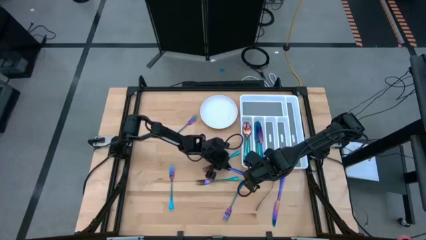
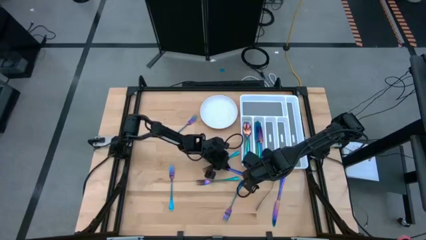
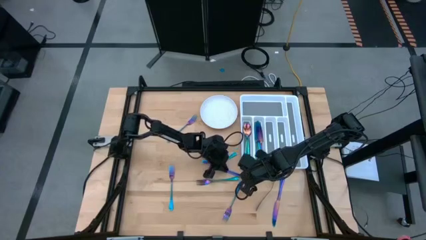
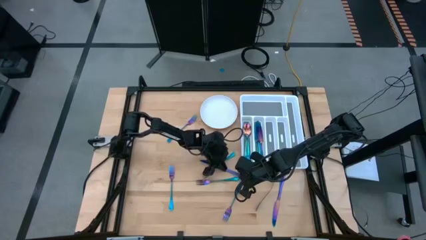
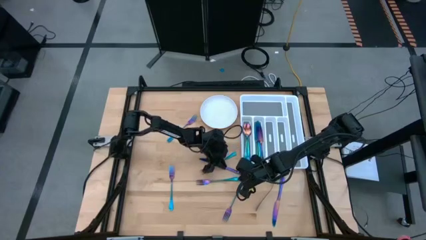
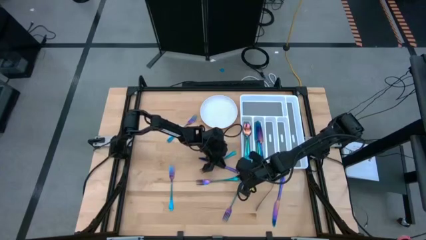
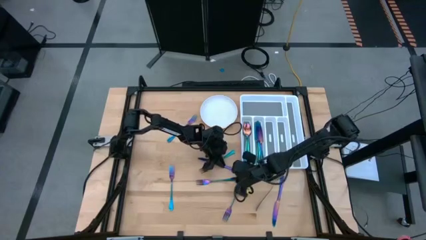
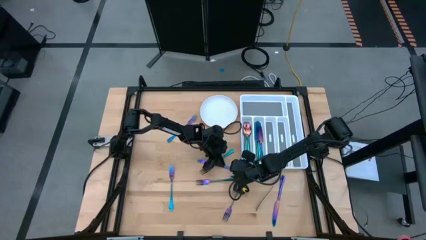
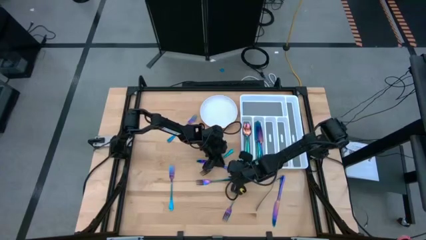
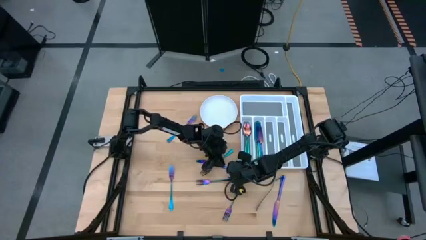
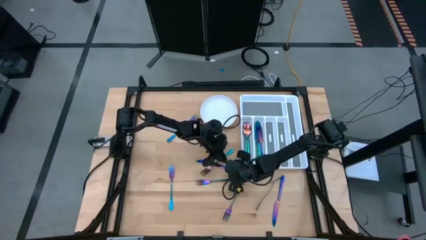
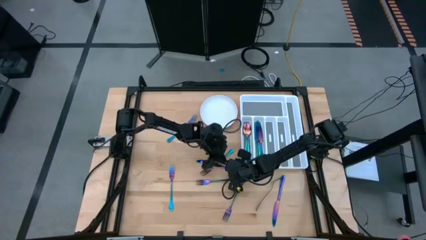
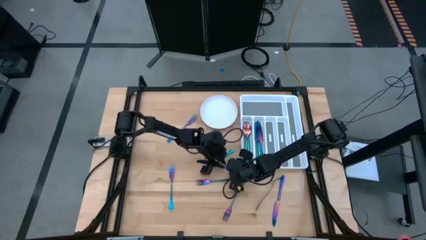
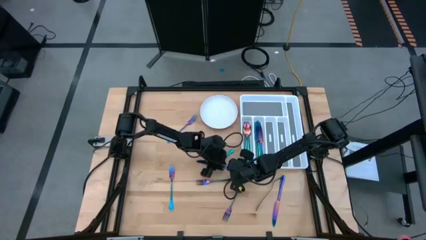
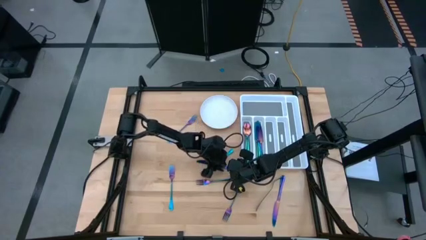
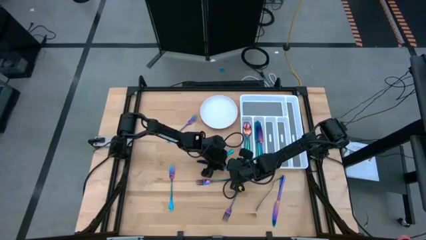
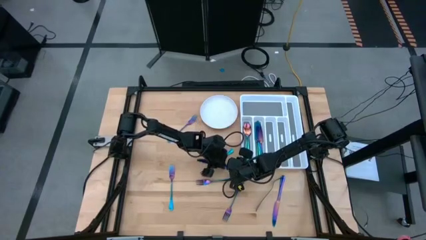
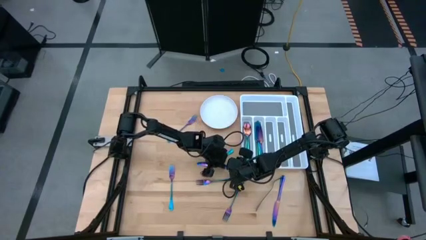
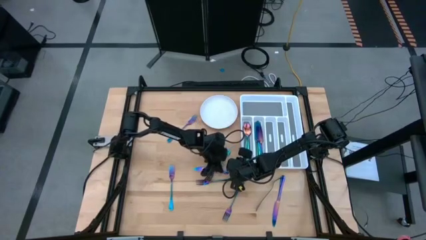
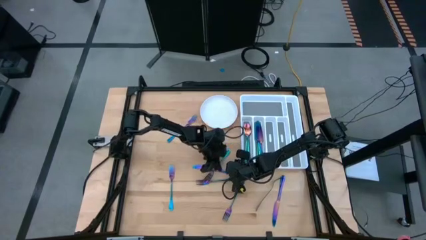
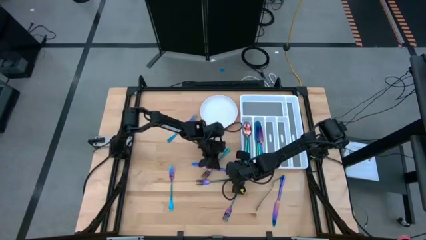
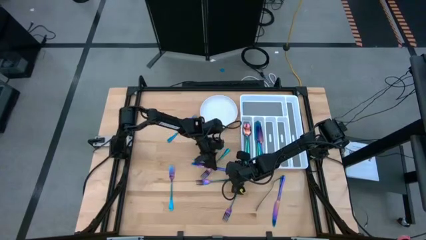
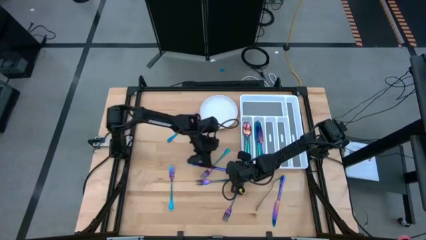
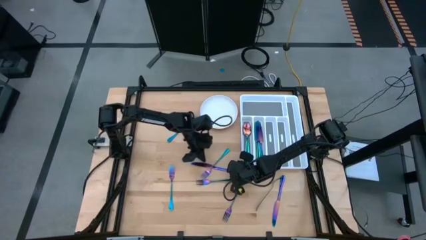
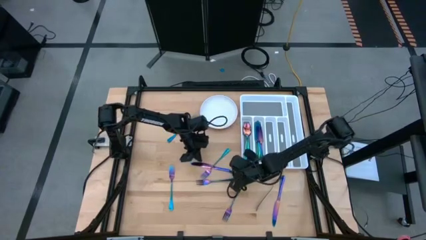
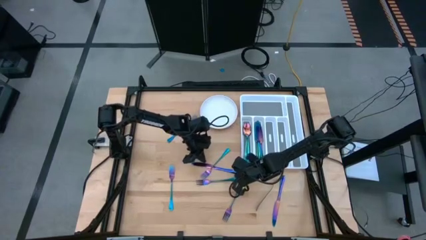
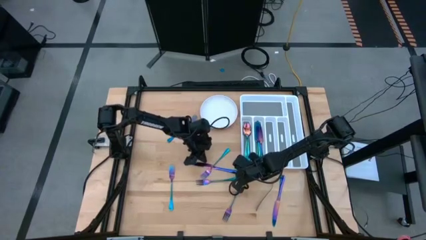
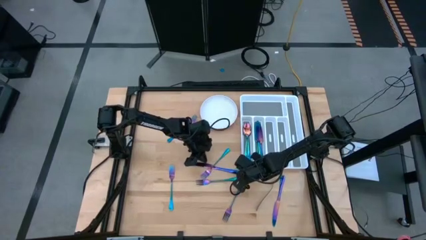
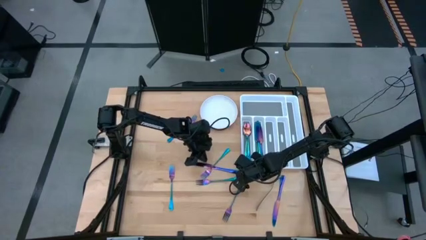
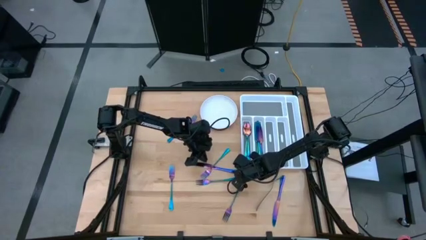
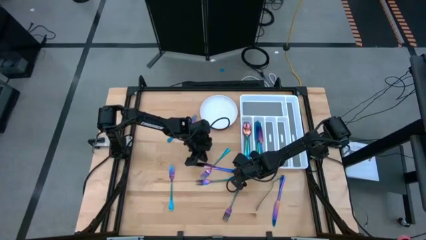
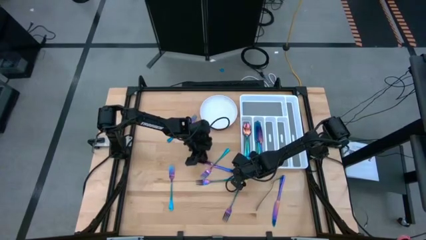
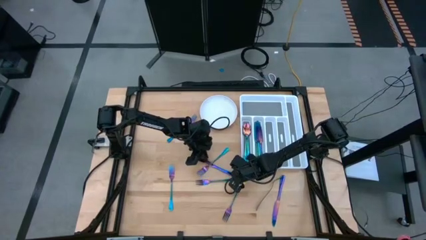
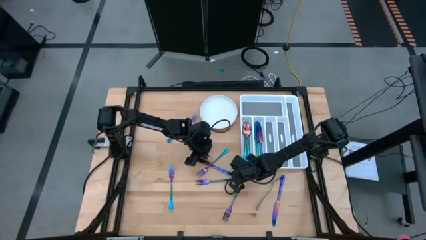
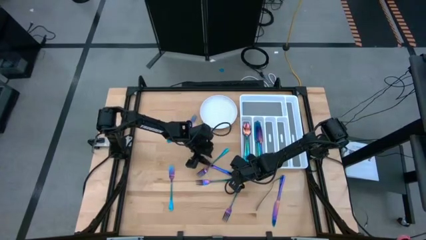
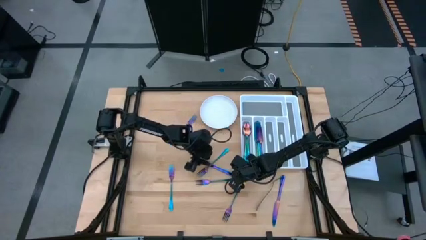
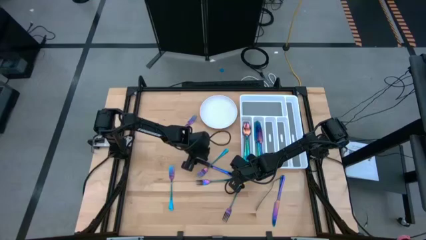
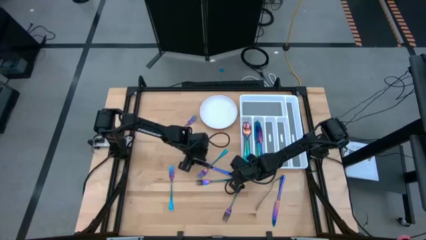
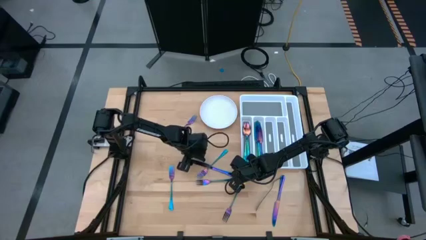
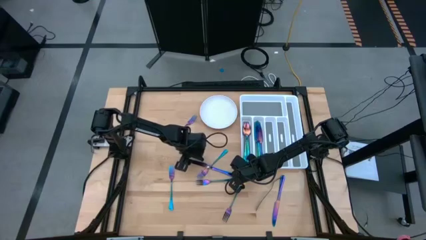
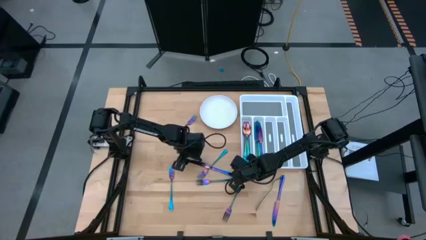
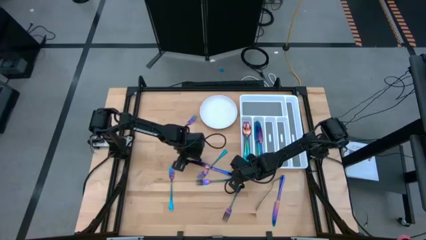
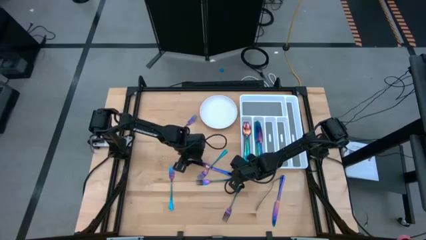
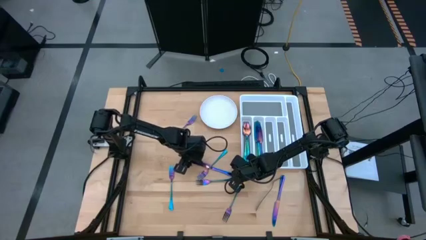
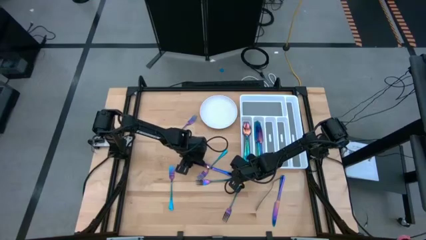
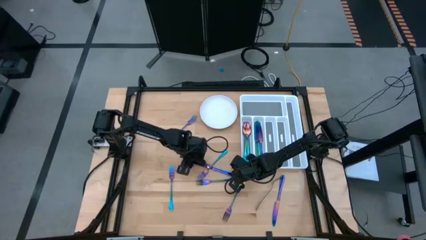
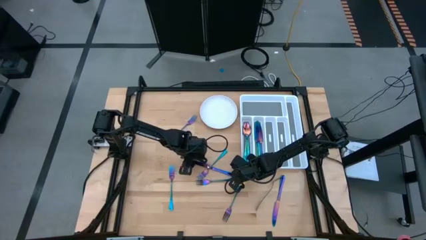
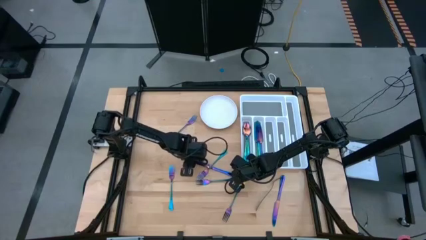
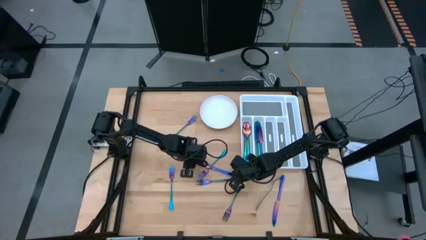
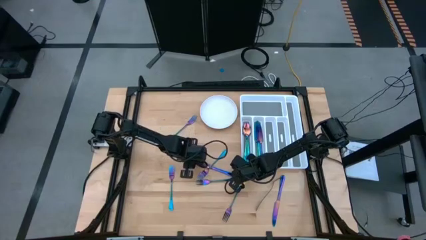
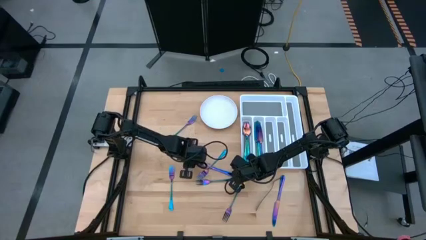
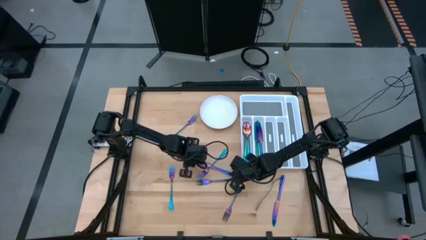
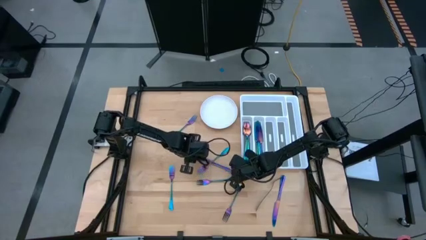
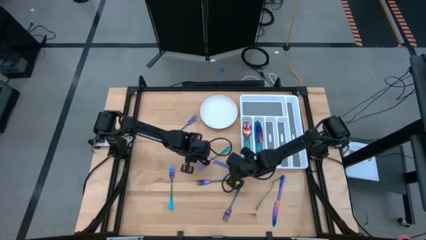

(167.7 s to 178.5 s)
Task: Sort silverware
Put the purple knife on the white silverware tray

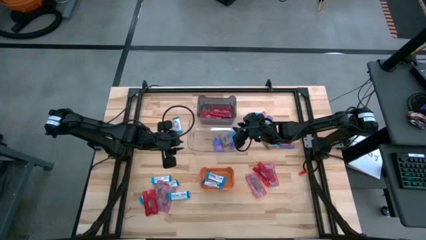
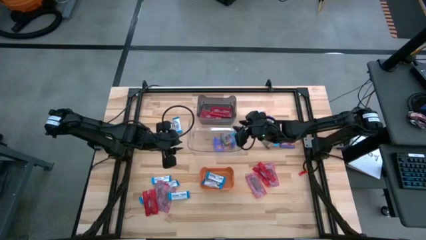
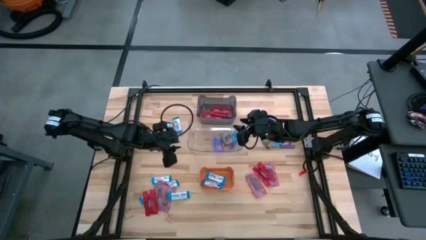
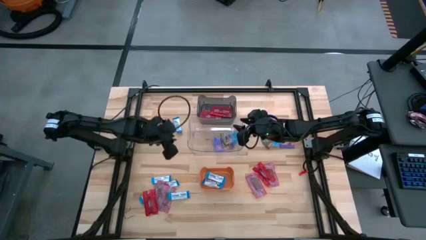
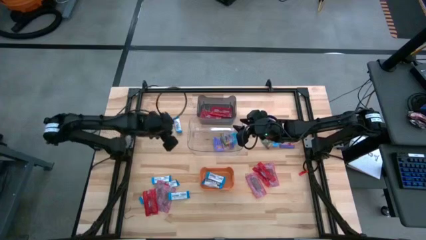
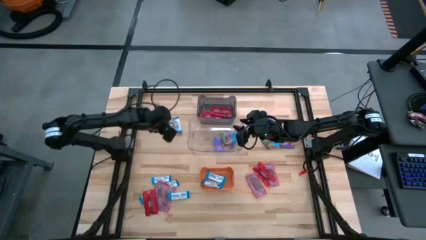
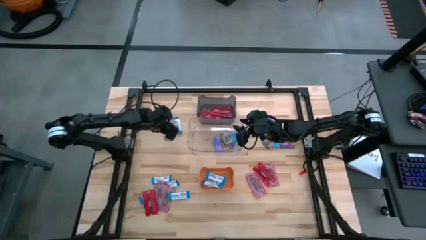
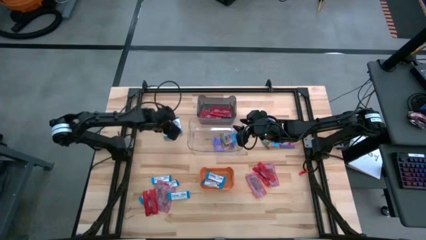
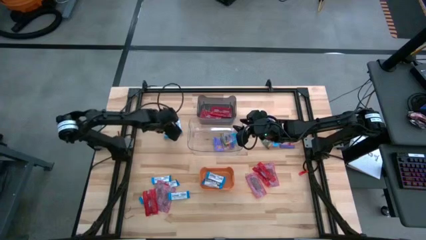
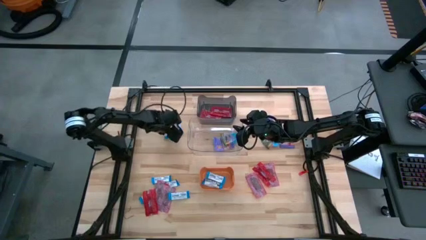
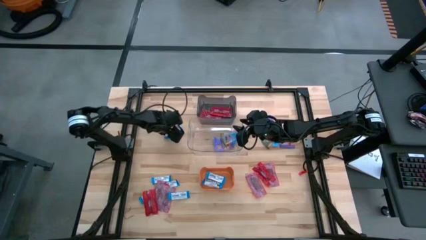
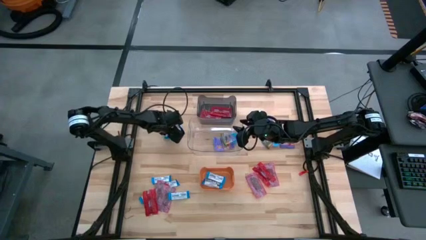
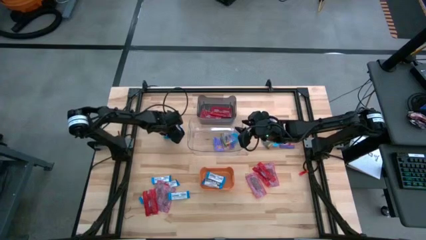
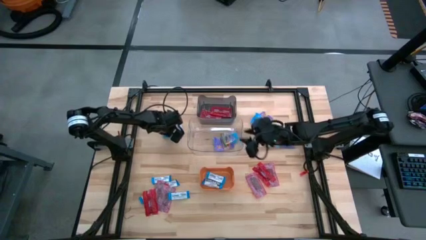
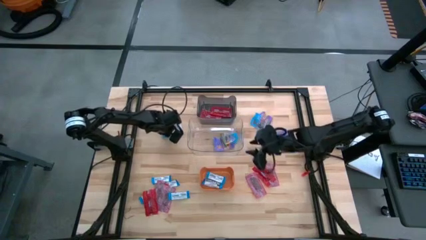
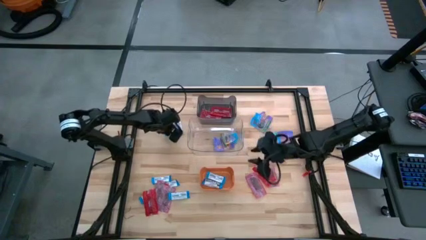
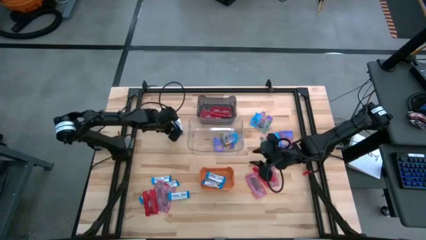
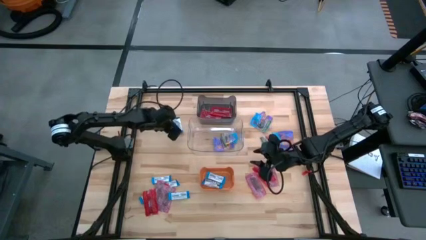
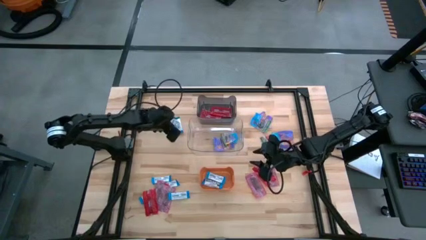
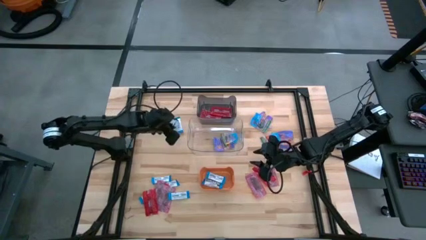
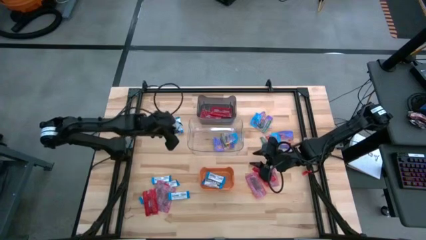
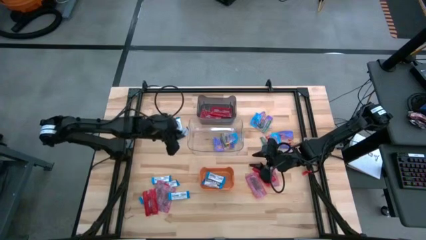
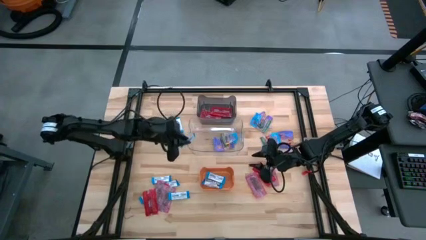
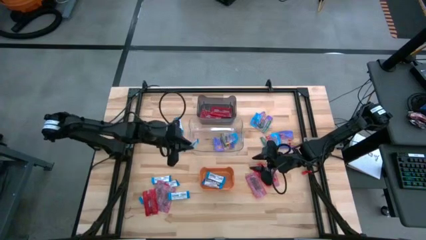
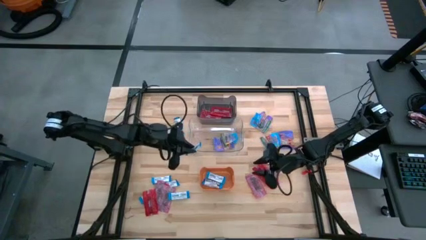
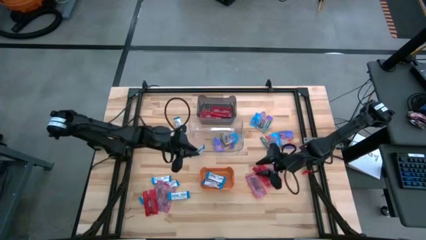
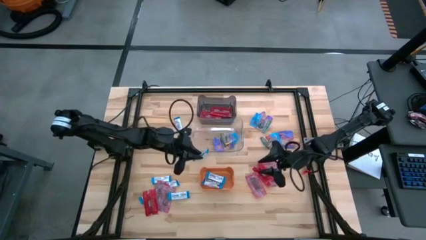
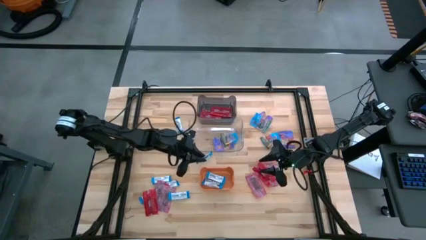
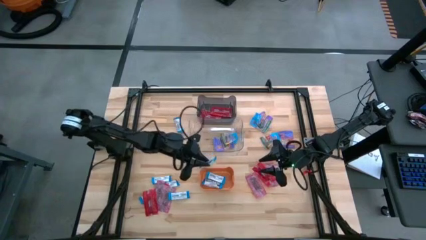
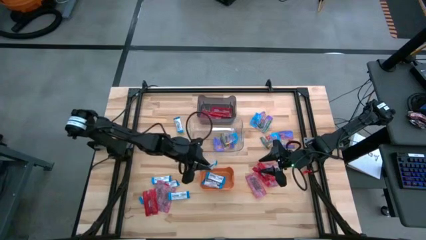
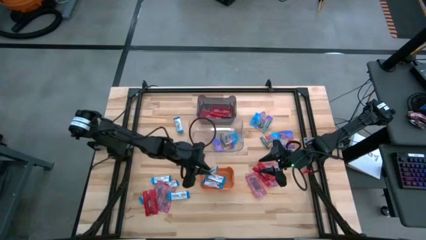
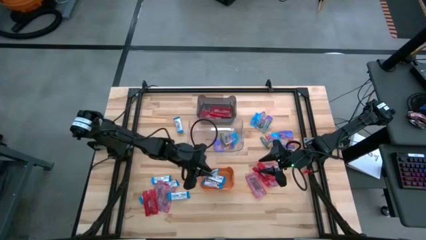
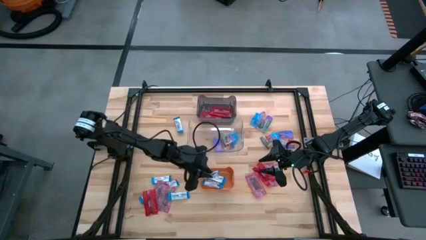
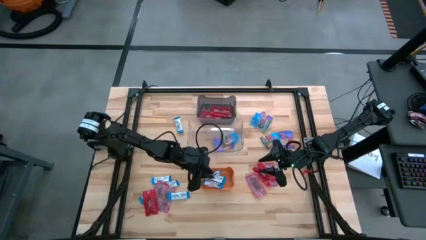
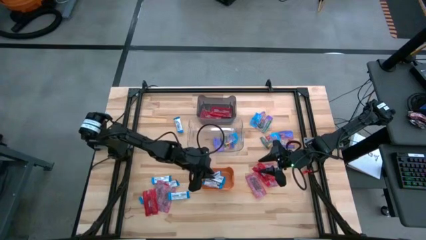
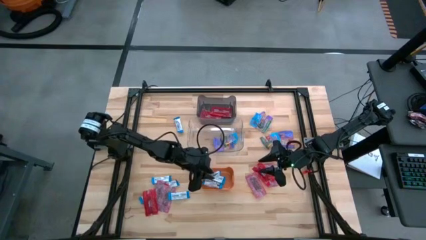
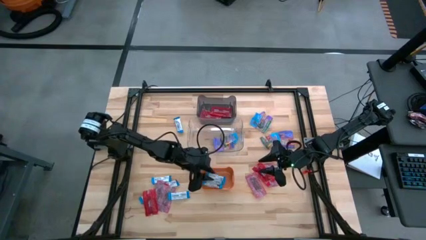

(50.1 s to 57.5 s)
Task: Sort candy
Put the white chocolate bar into the orange bin
